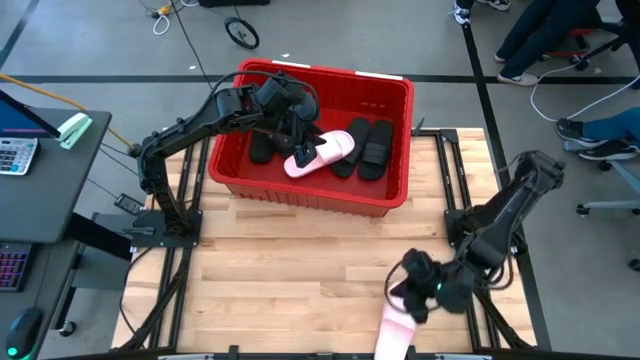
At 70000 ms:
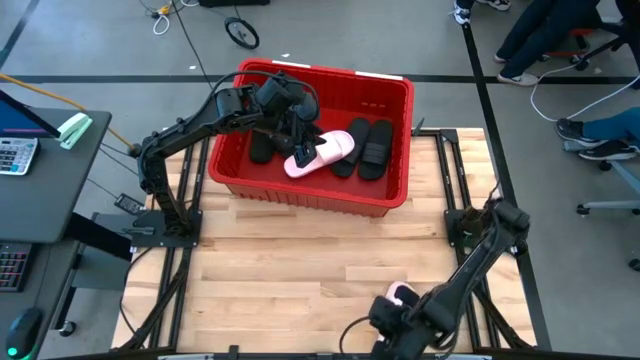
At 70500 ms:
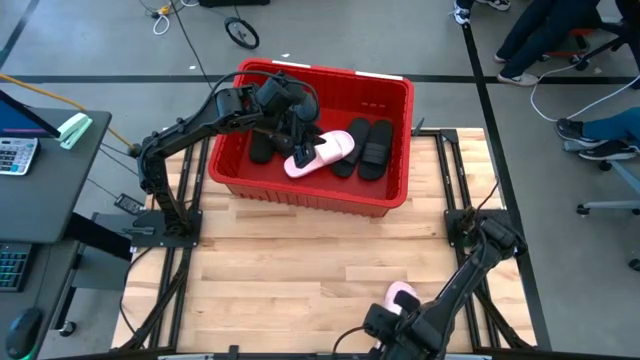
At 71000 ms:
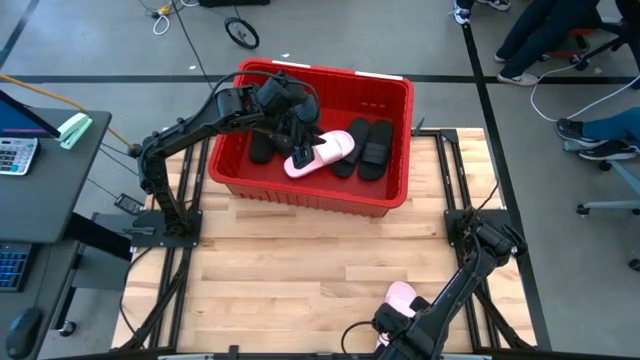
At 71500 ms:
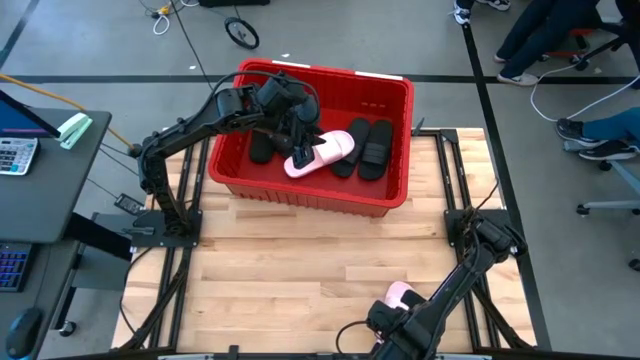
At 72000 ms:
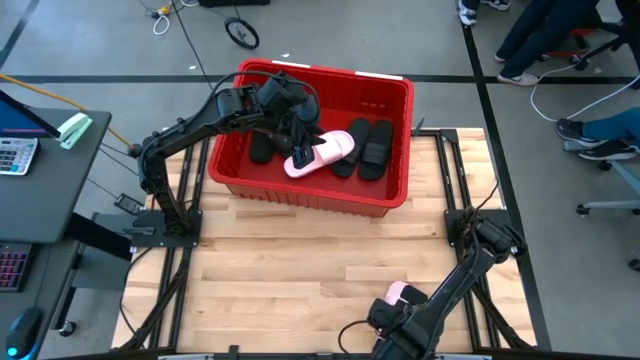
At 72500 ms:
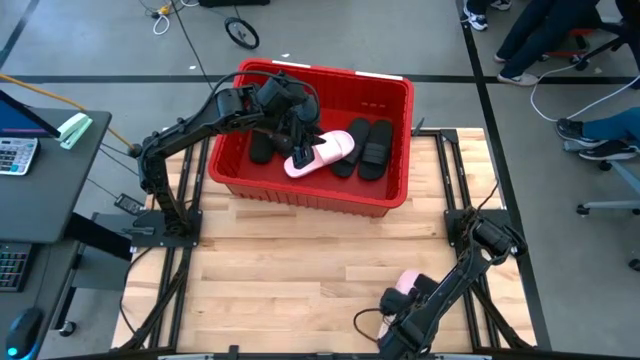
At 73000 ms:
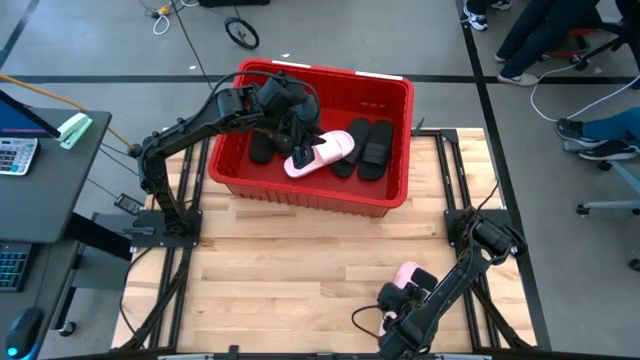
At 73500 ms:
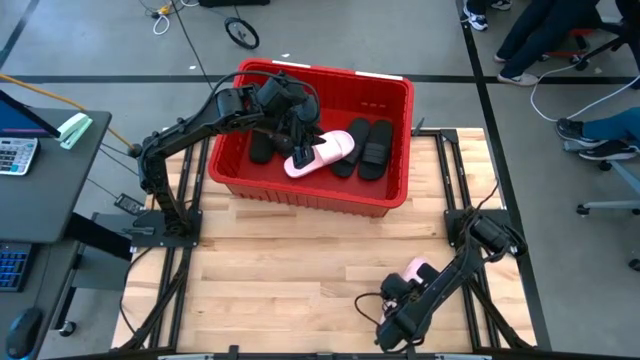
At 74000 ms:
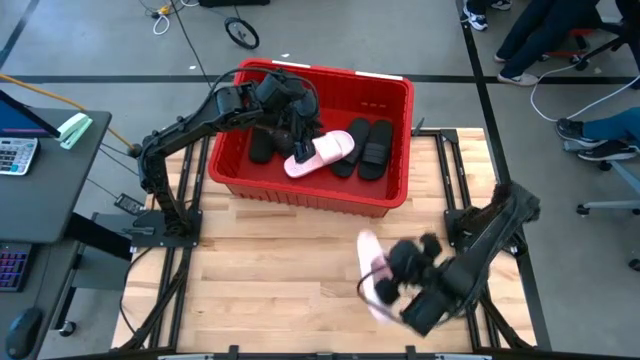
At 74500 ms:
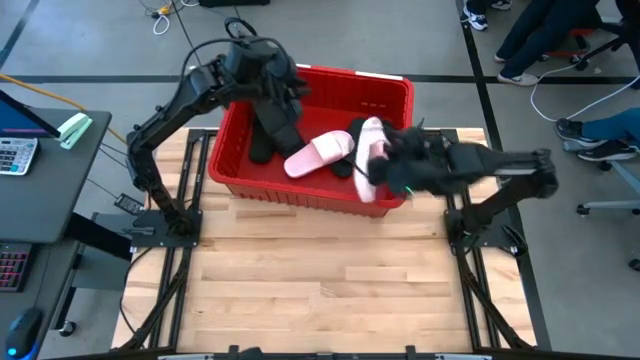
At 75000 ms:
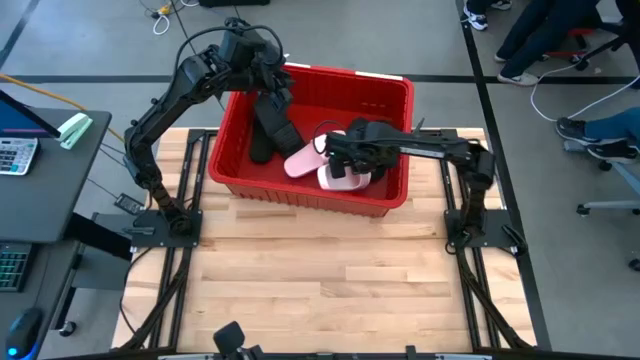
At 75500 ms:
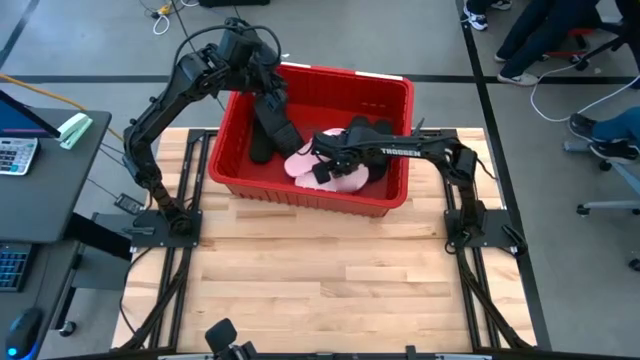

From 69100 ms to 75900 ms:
Task: Pick and place slides into bin
Put the pink slide into the bin

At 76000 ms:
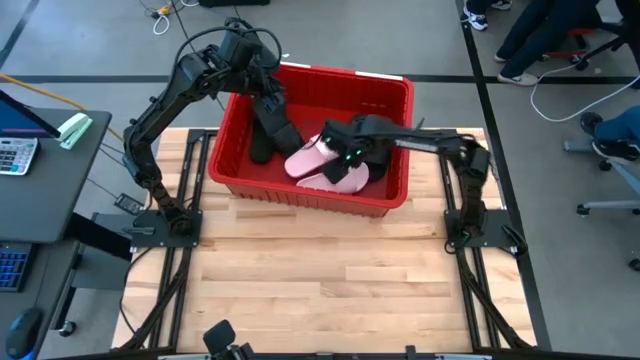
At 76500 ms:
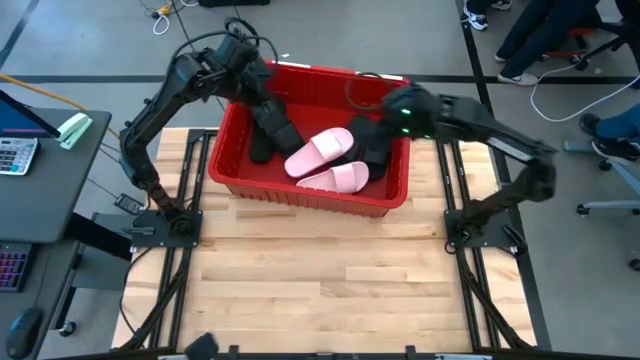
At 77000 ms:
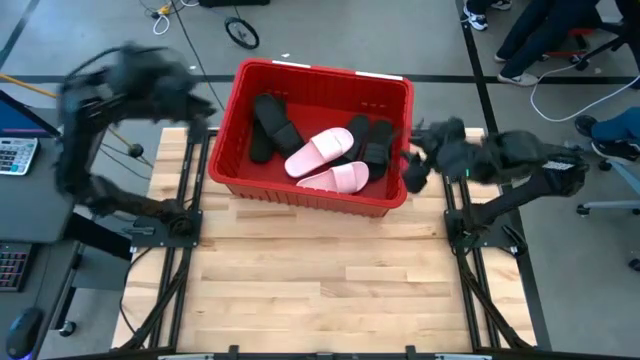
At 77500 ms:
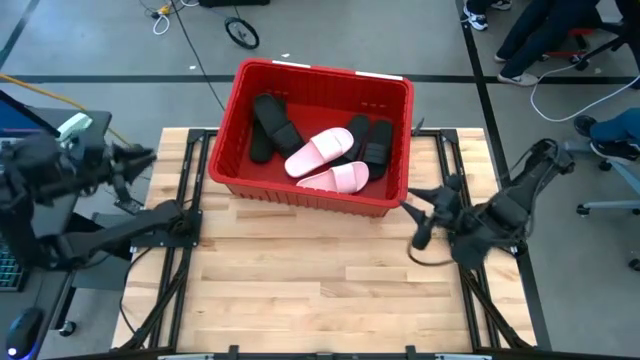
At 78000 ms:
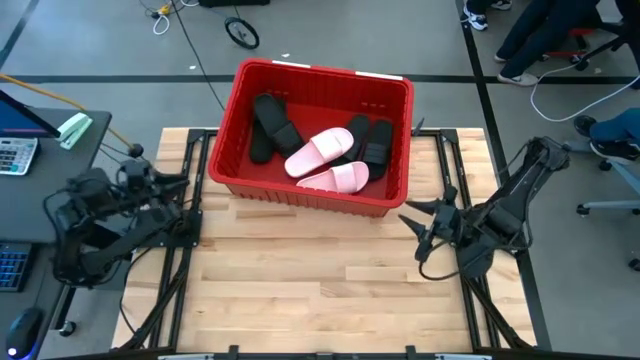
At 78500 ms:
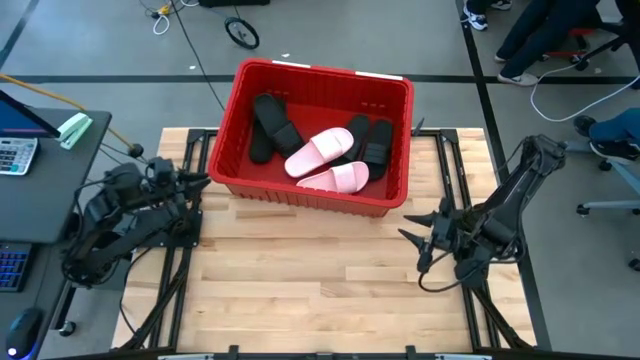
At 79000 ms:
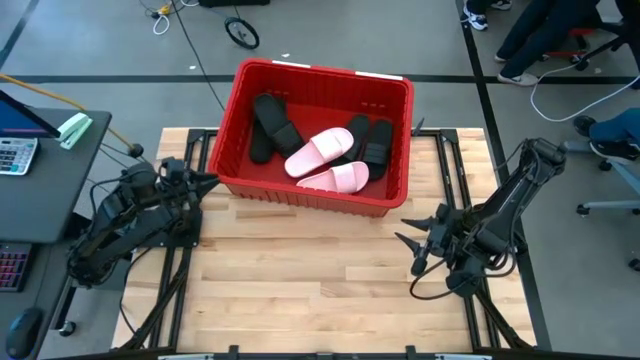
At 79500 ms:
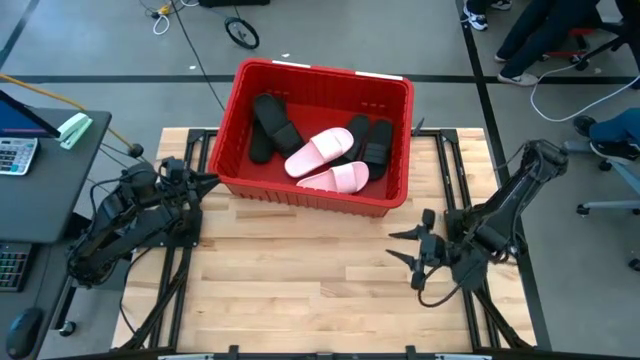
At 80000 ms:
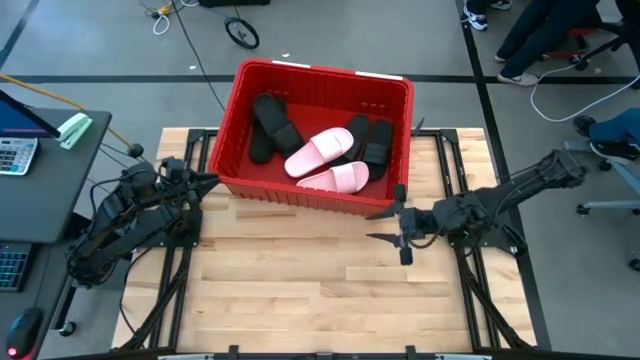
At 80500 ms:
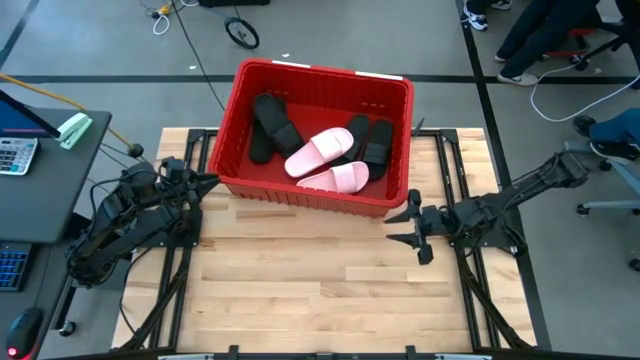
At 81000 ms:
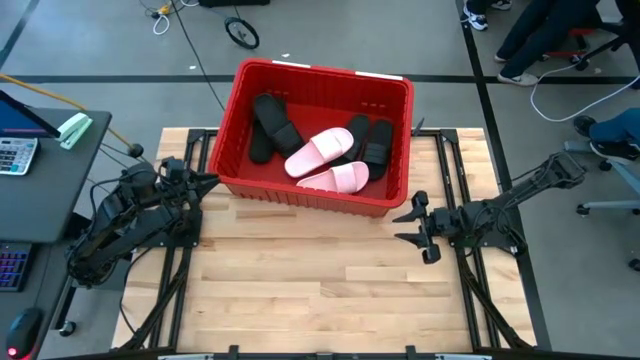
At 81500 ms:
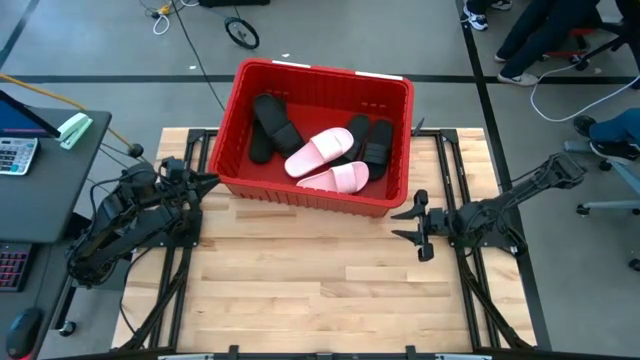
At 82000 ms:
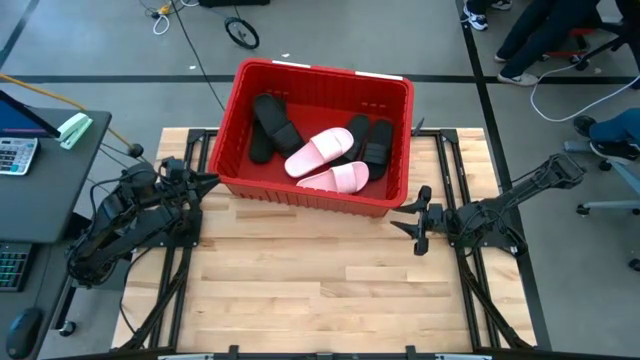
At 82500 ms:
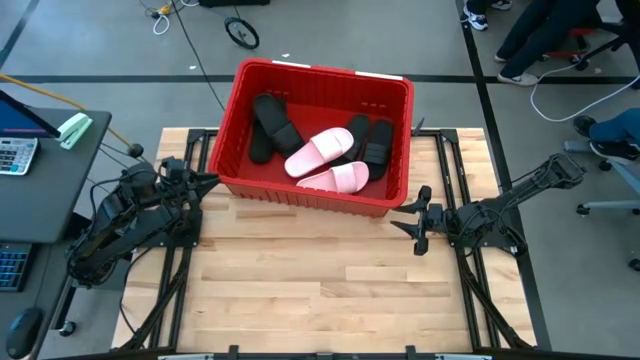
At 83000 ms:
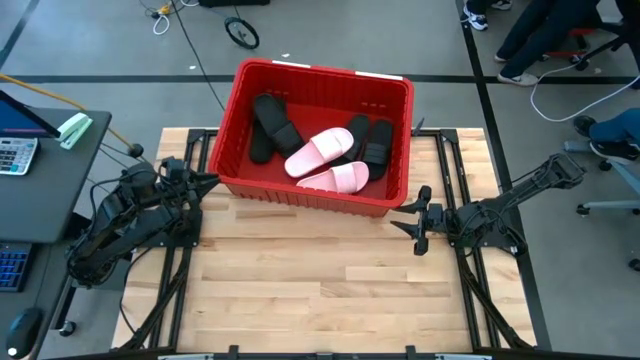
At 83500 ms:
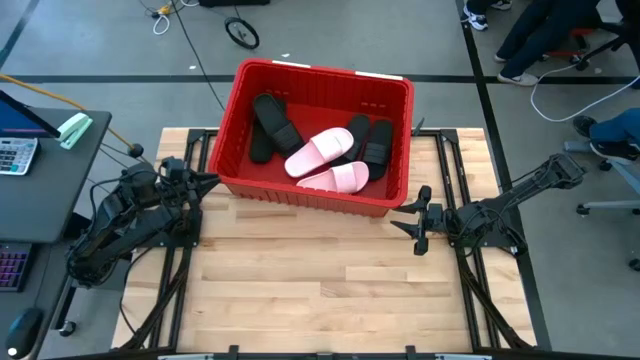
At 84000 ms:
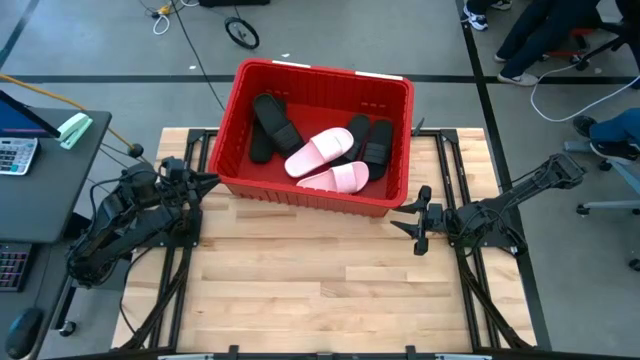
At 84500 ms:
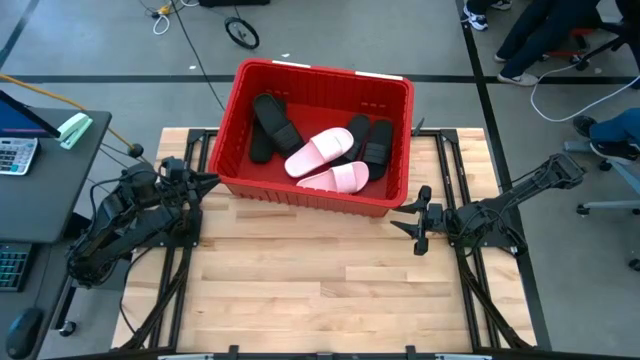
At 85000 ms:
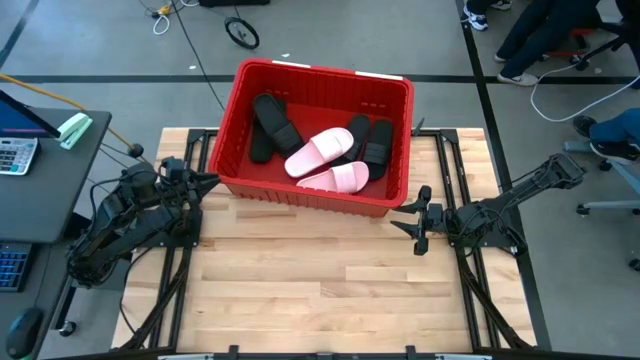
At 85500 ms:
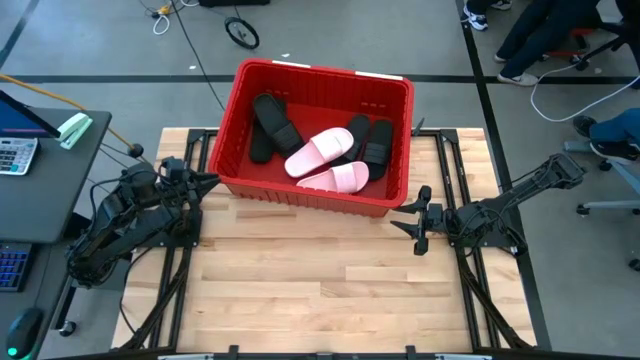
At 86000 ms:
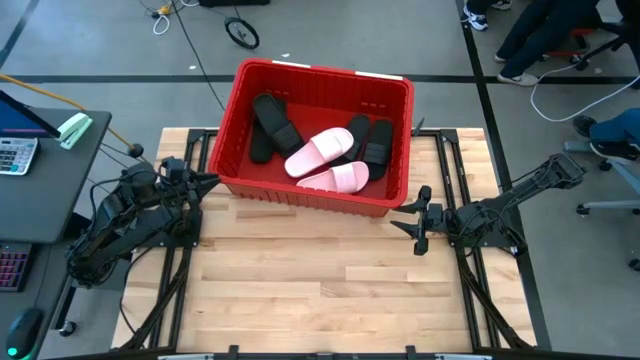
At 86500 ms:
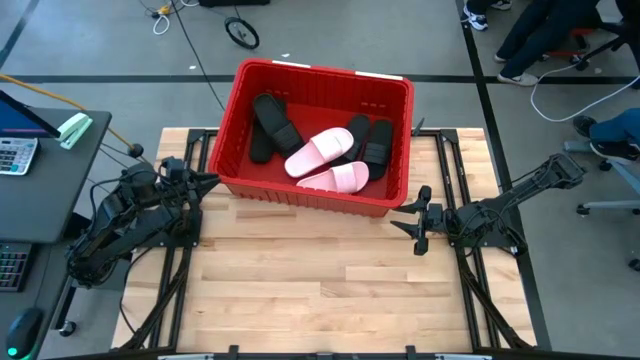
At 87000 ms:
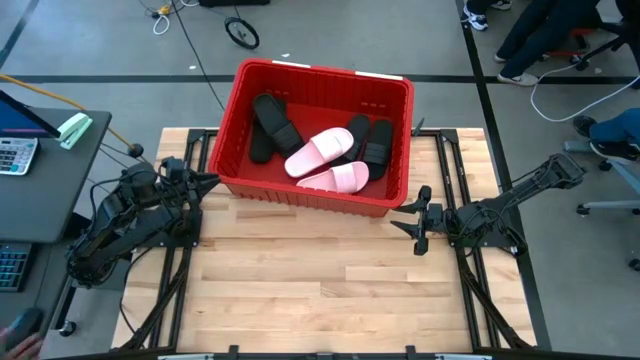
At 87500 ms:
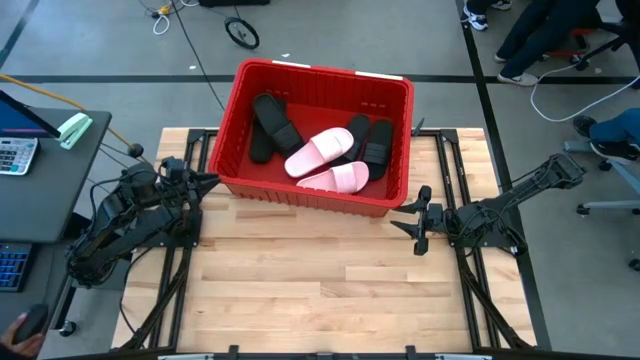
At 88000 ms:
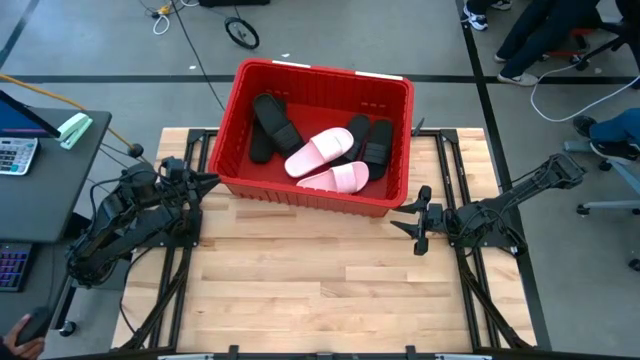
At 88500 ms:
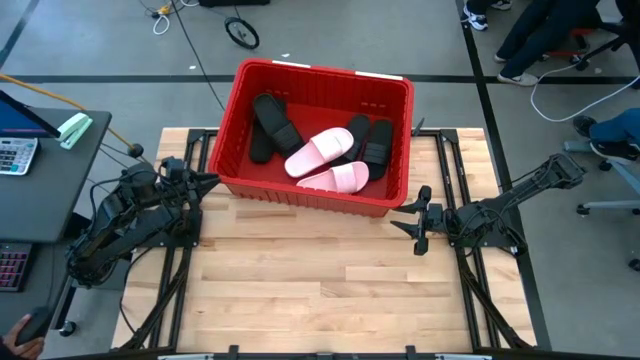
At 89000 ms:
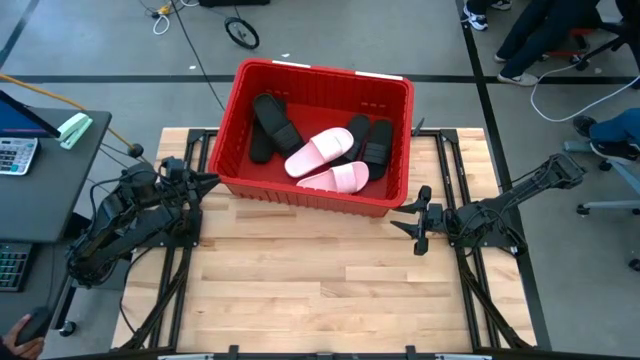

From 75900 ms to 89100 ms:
Return to Home Position
